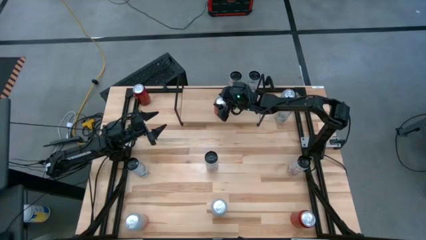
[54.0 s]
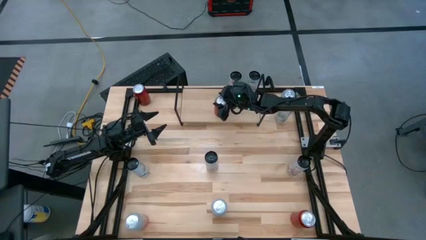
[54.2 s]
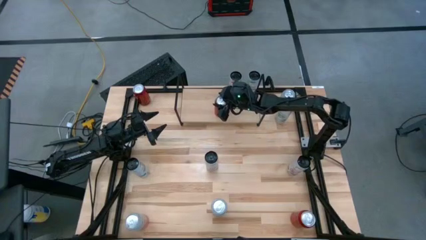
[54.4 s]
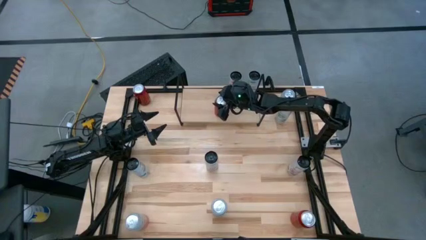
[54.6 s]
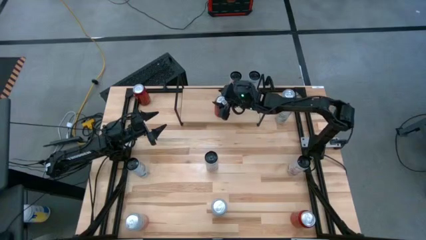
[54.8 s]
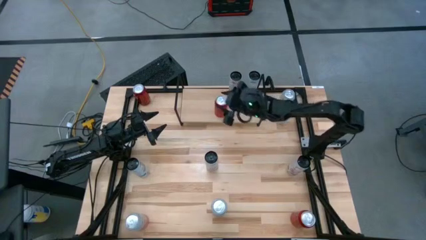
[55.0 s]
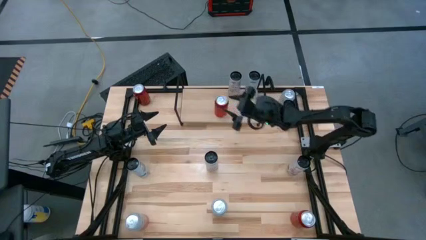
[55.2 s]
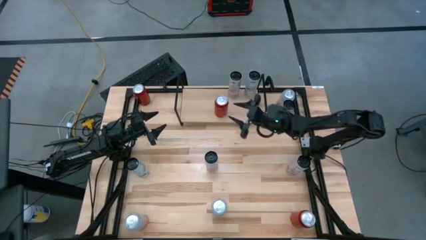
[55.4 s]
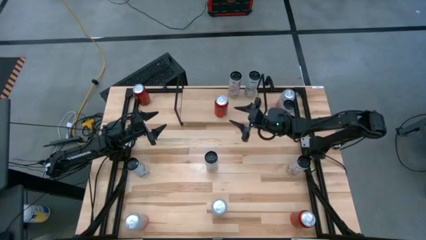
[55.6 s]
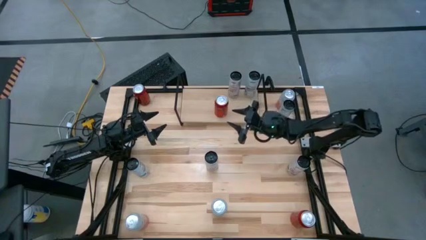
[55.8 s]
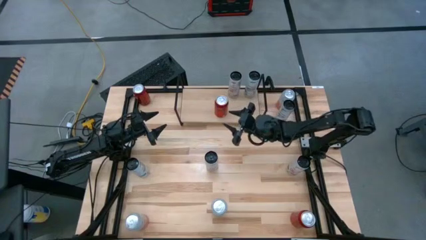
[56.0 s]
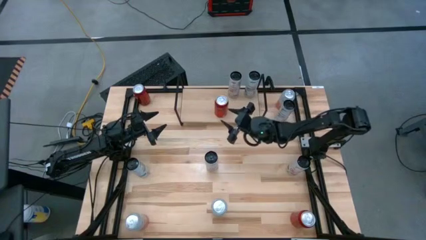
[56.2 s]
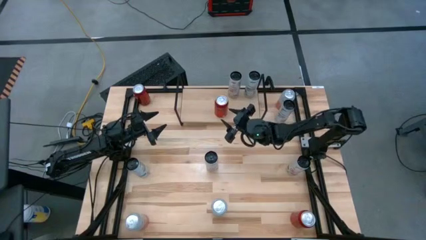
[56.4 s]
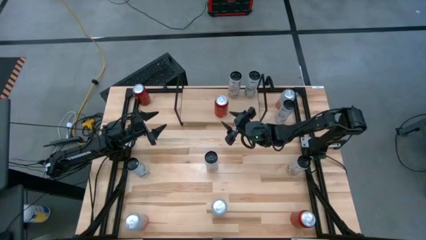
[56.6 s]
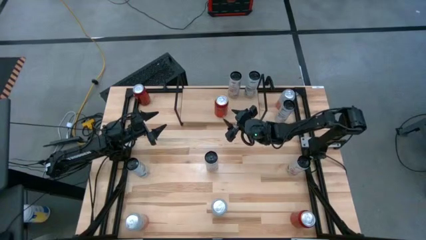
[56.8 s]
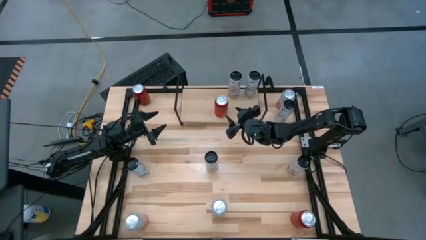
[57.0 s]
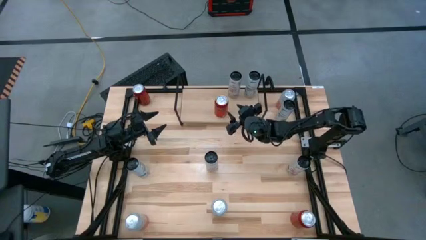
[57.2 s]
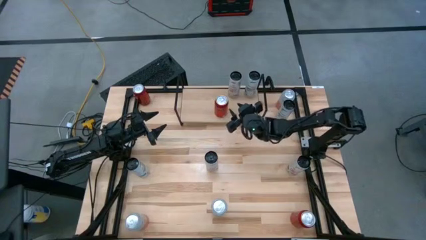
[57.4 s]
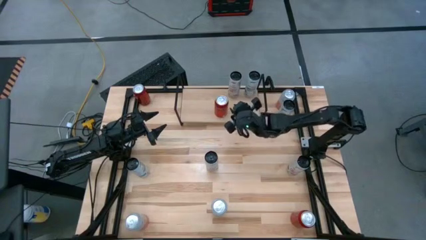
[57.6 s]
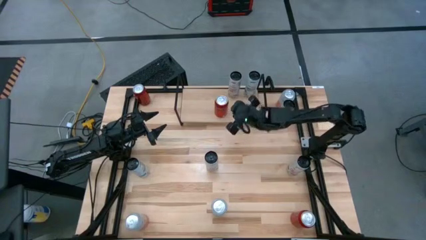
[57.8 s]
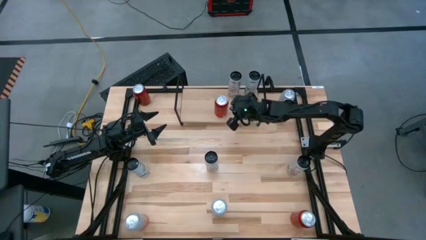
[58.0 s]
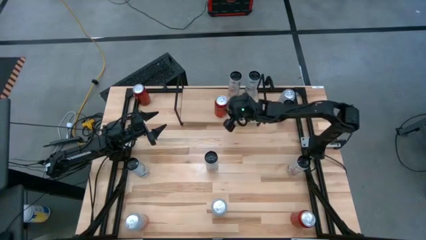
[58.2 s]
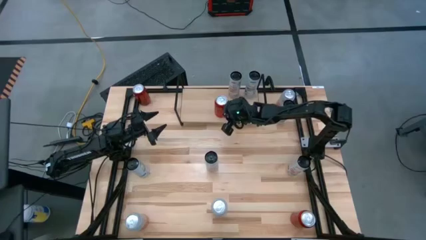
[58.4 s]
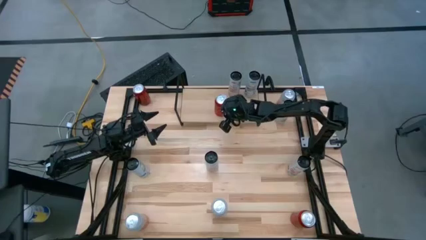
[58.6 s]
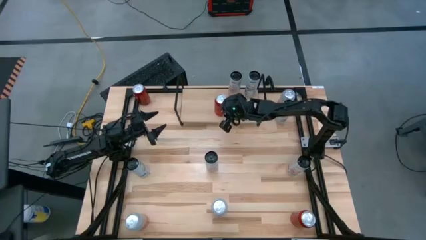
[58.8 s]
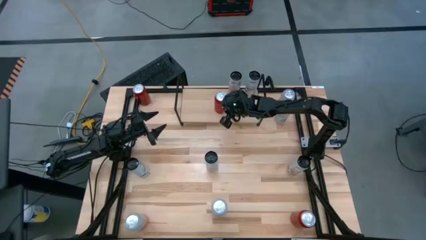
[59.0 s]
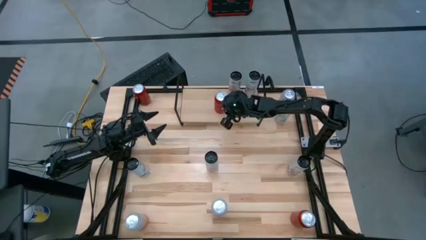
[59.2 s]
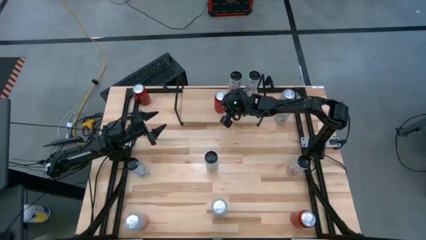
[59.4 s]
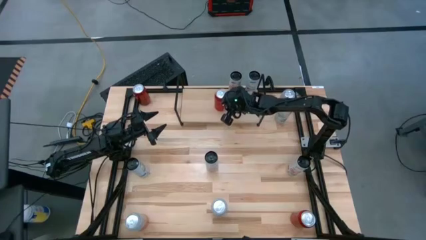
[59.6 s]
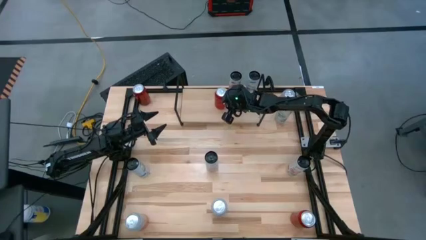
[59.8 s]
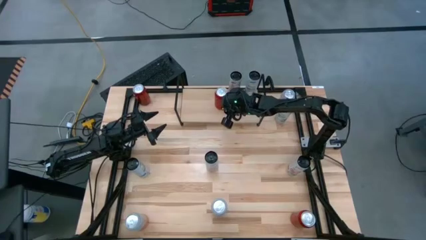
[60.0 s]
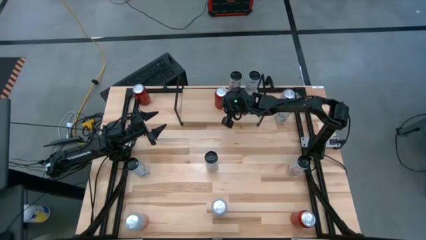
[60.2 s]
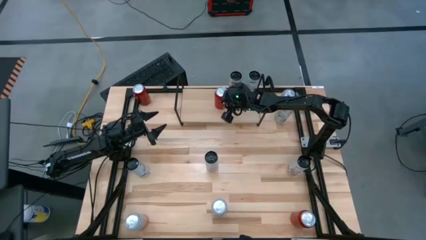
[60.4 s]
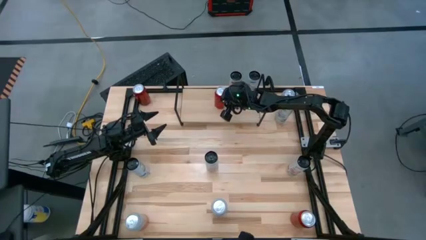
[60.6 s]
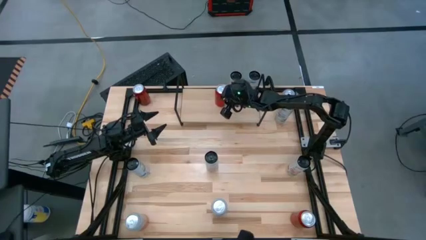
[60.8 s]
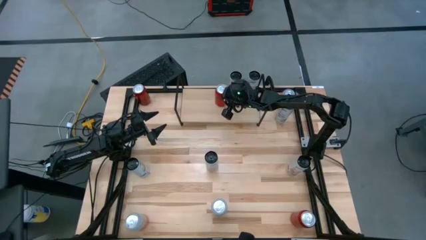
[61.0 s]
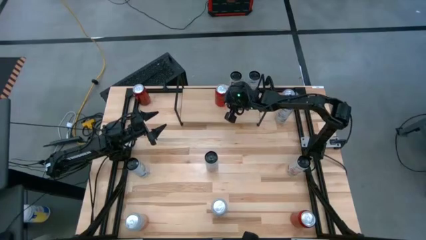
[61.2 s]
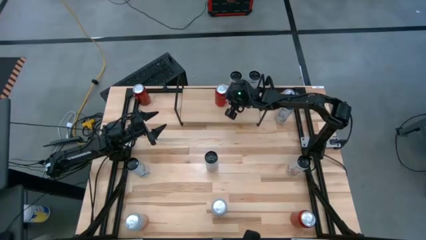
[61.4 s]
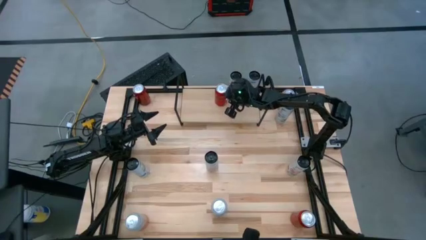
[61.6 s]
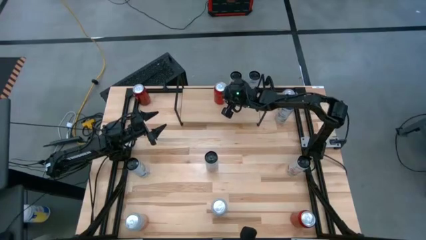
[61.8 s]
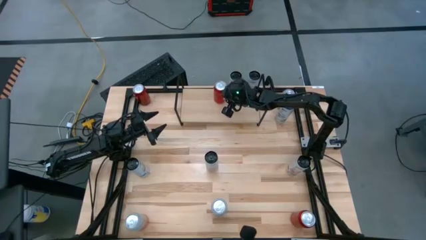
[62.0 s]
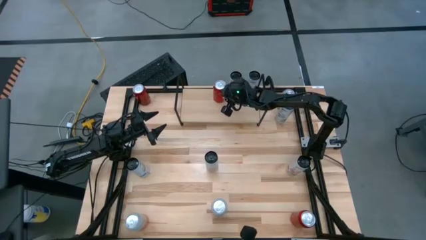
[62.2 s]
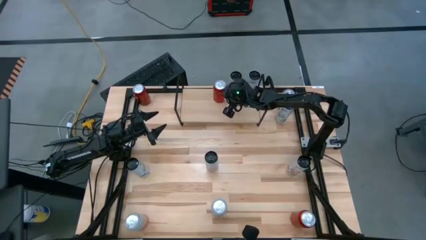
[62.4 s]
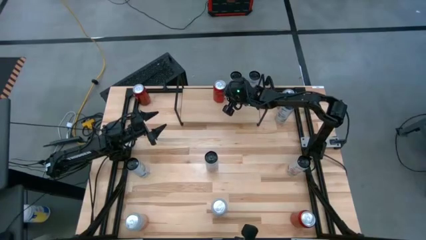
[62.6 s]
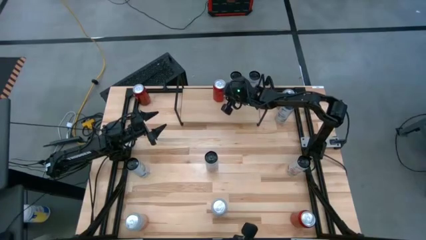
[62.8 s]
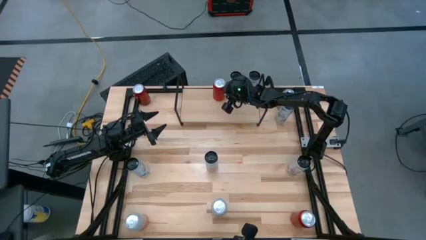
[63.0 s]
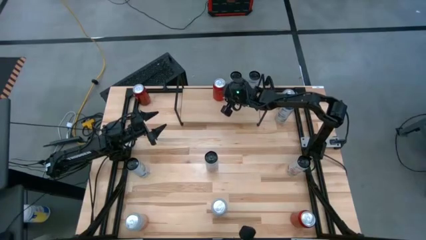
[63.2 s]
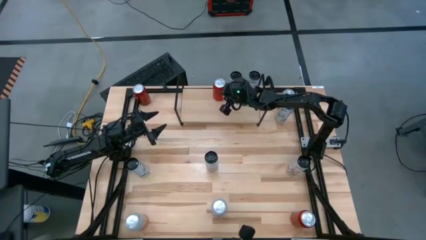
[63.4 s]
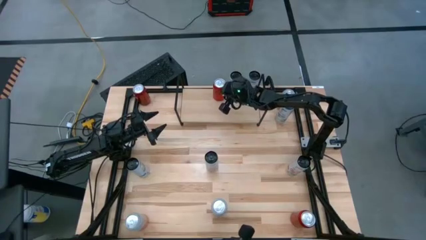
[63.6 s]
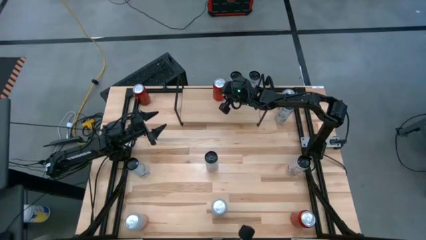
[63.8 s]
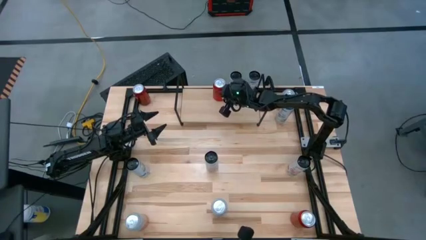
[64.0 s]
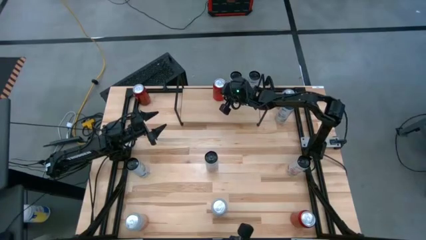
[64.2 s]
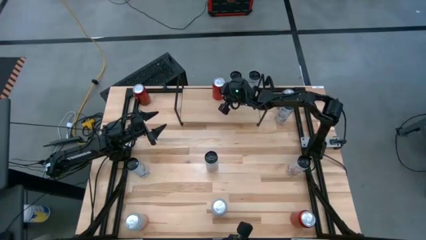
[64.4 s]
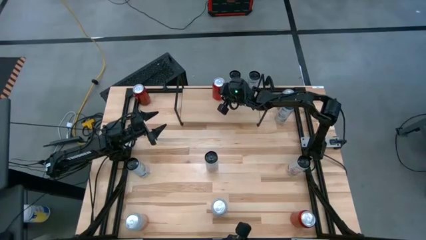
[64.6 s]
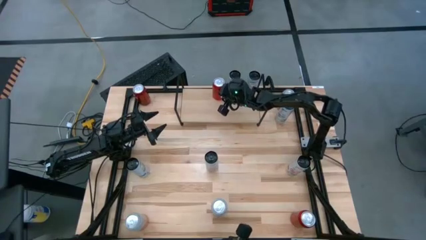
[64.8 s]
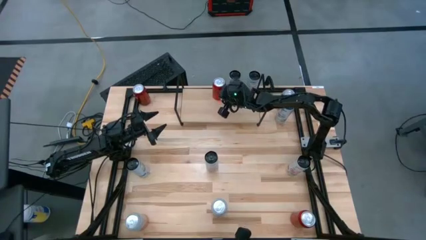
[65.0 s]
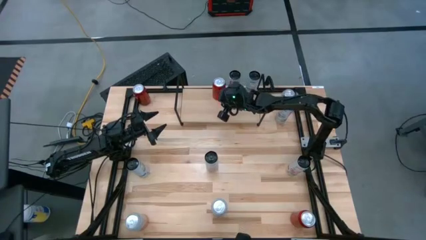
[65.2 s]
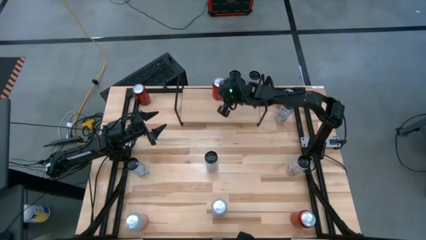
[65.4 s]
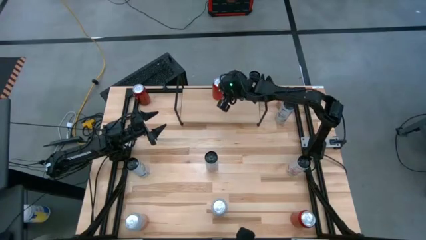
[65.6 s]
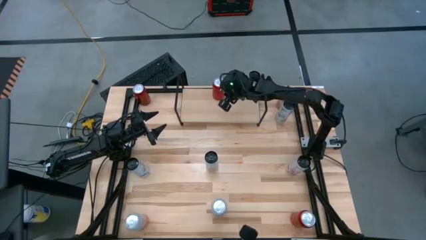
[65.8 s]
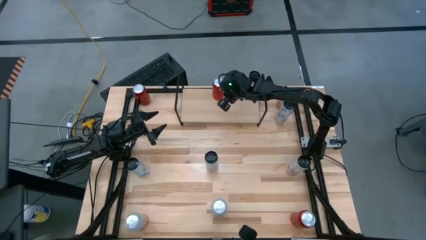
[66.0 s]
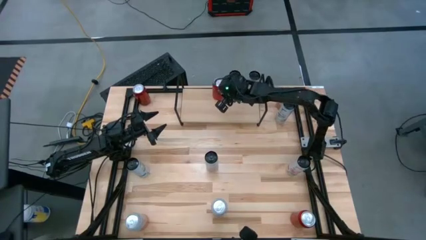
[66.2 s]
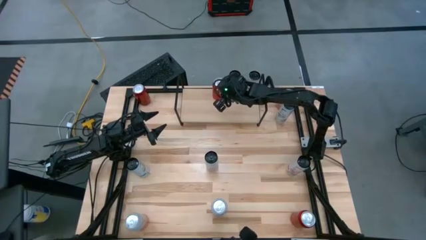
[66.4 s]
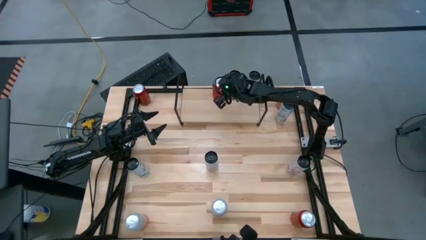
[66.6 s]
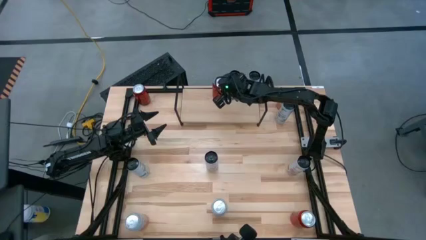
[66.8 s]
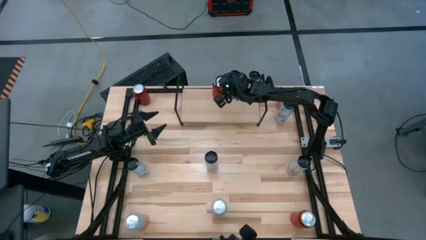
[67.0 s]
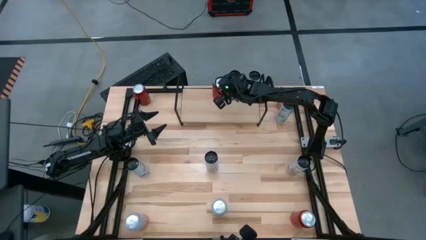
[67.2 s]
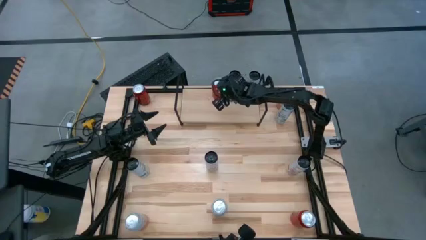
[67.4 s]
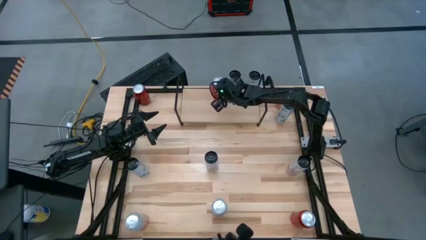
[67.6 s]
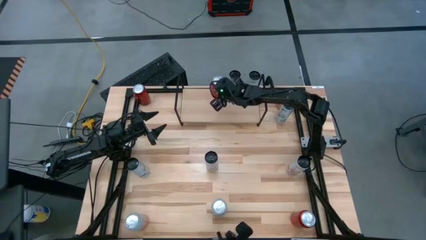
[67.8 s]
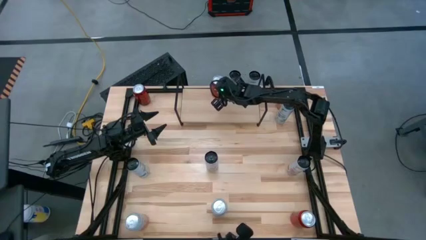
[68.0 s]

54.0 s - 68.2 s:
Task: Place canned beverage on shelf
Put the middle red black soda can on the shelf

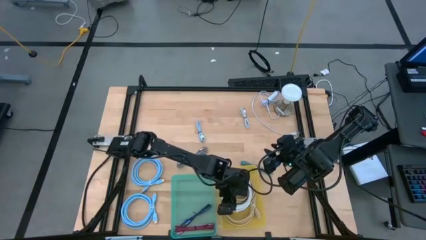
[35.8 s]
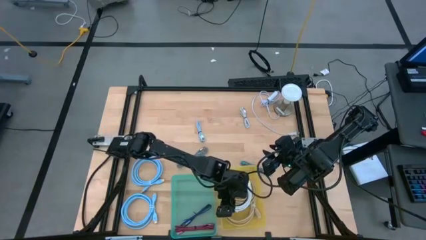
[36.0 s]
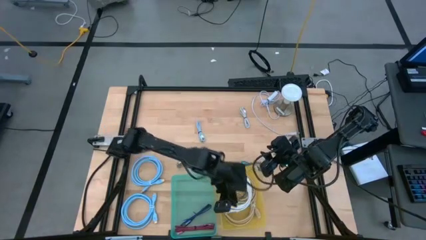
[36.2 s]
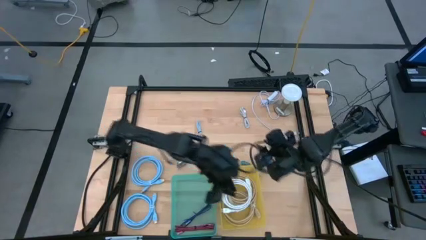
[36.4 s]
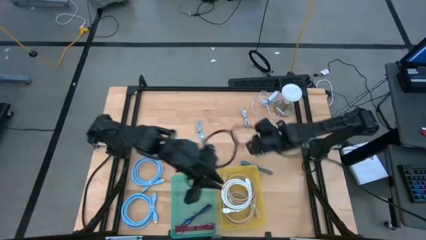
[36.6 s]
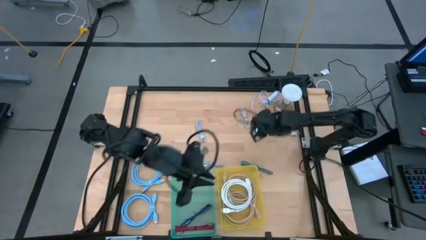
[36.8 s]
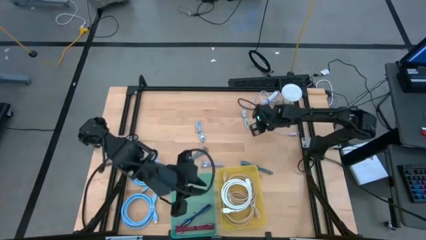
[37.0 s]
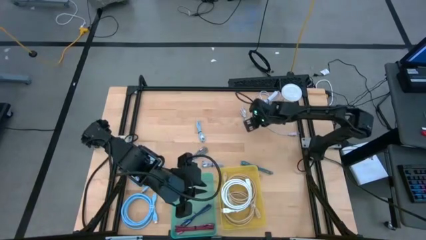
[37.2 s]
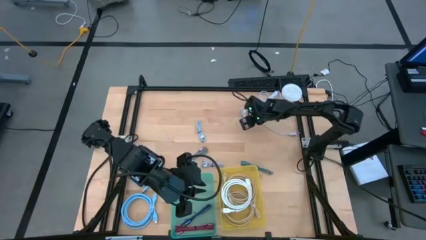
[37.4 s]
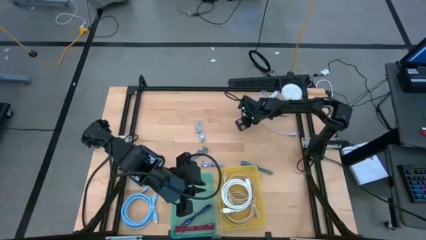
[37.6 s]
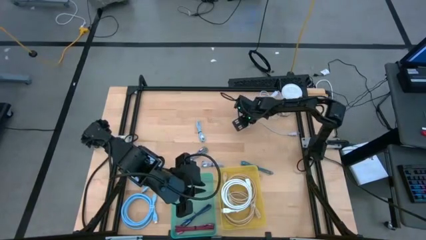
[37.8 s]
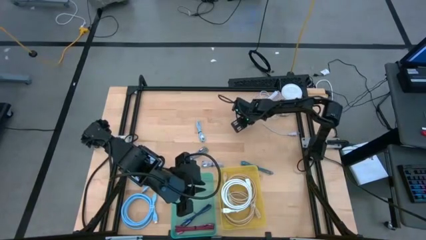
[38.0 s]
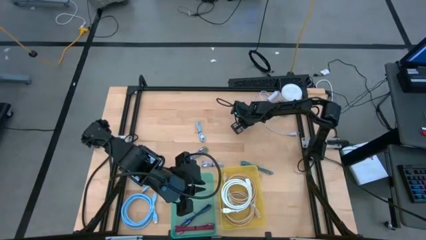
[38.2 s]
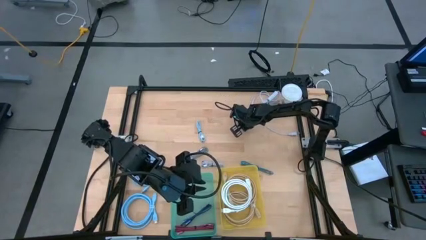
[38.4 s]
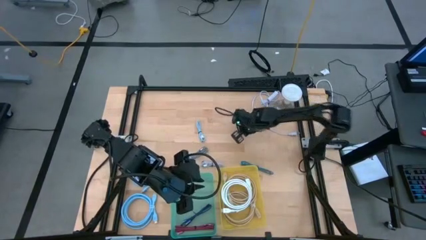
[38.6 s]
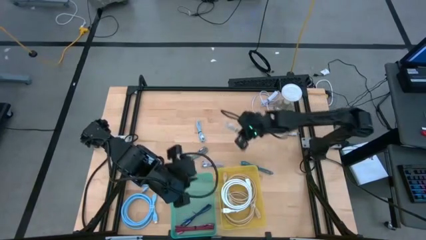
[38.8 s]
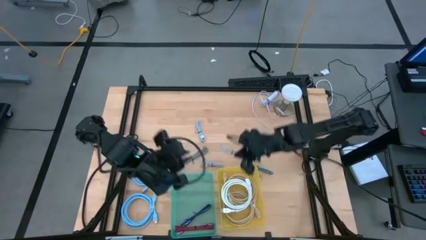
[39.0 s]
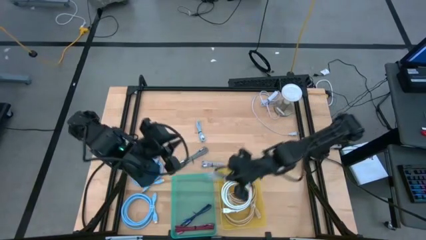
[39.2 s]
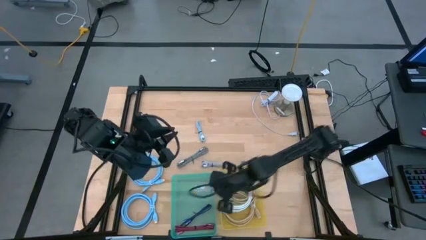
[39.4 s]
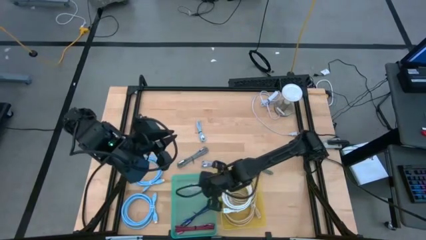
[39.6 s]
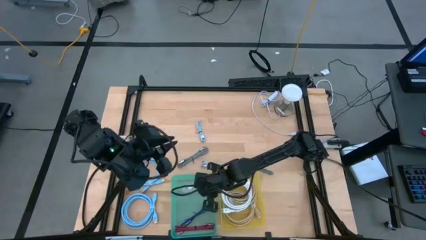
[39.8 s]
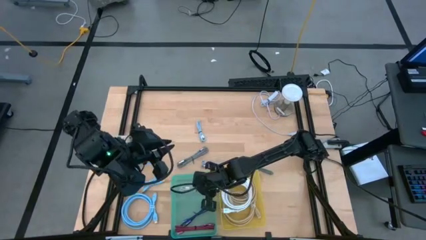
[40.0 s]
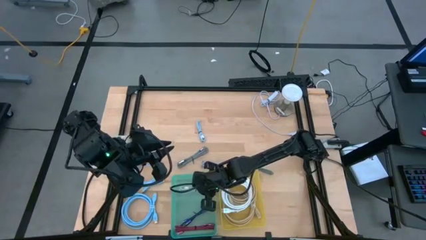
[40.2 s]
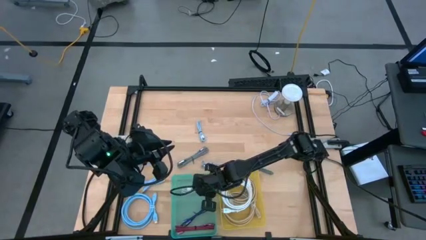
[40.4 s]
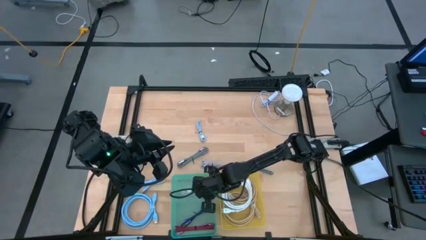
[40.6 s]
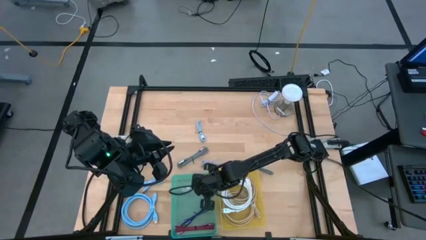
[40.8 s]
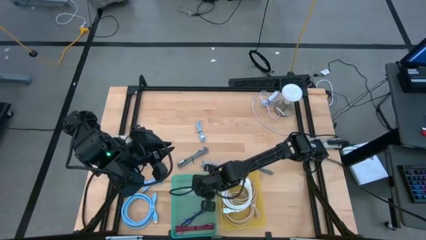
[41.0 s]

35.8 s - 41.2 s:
Task: Pick & Place USB Port
Put the white USB cable into the green bin
